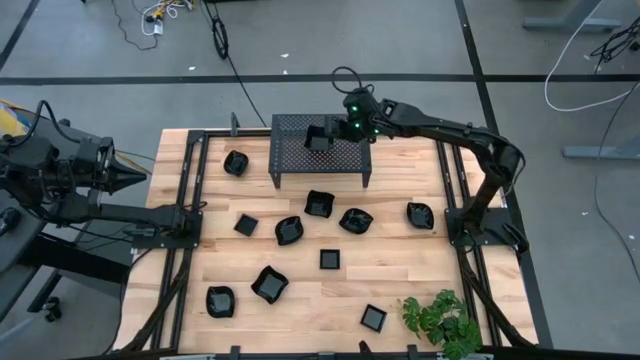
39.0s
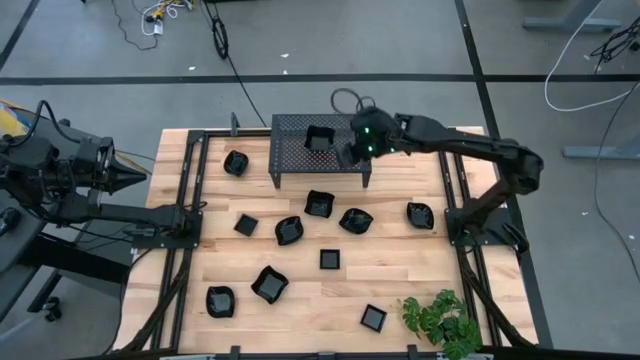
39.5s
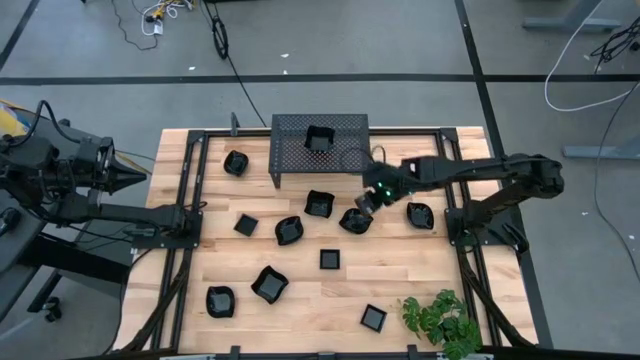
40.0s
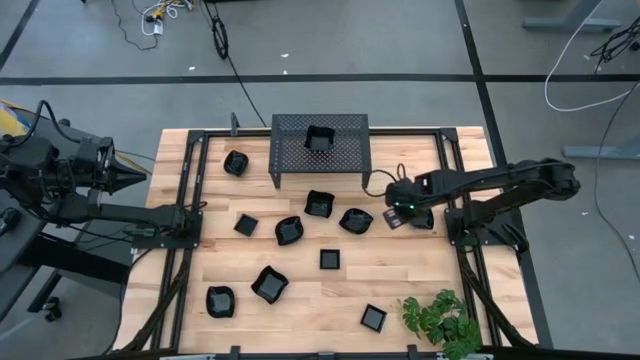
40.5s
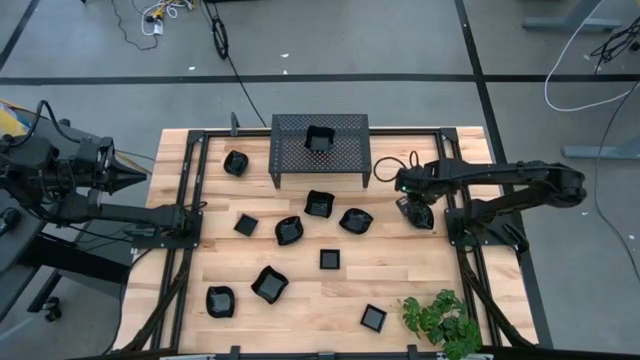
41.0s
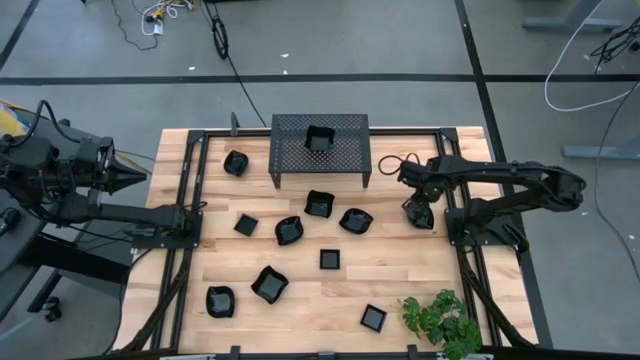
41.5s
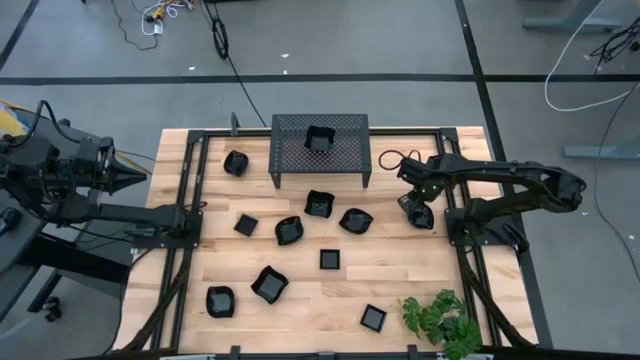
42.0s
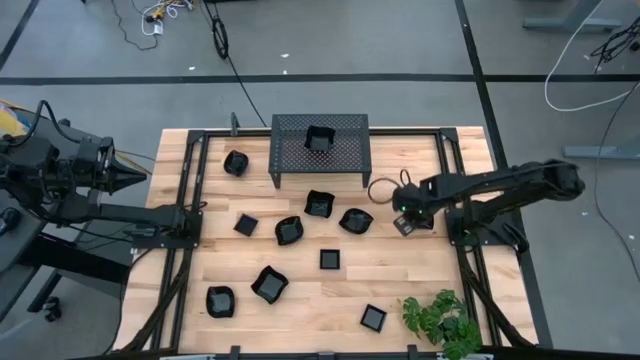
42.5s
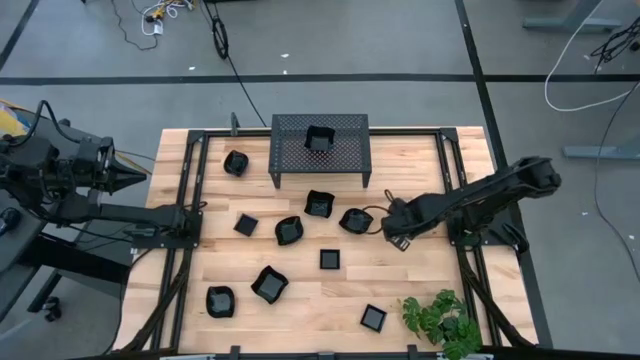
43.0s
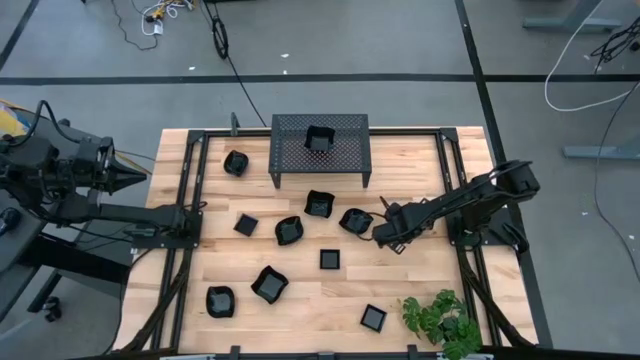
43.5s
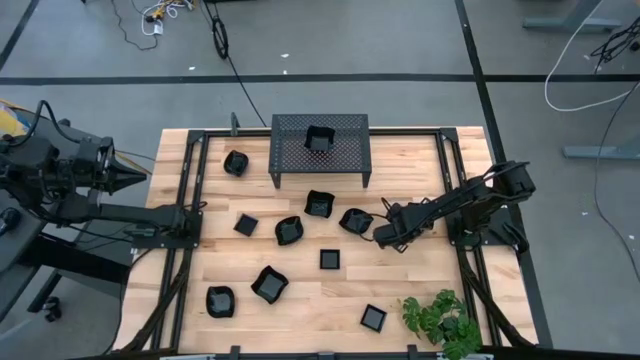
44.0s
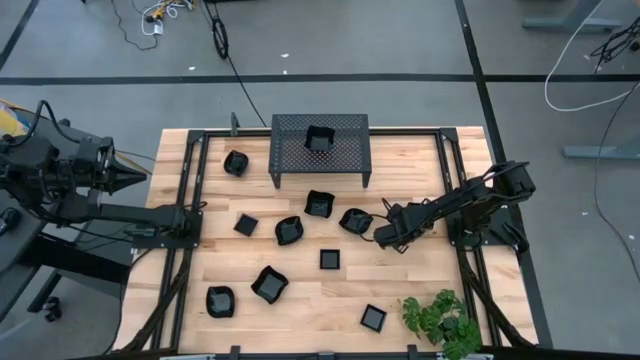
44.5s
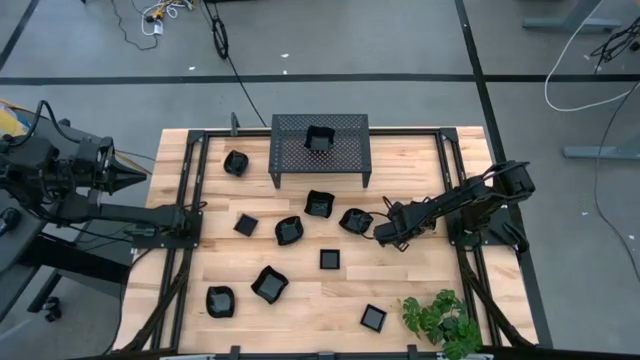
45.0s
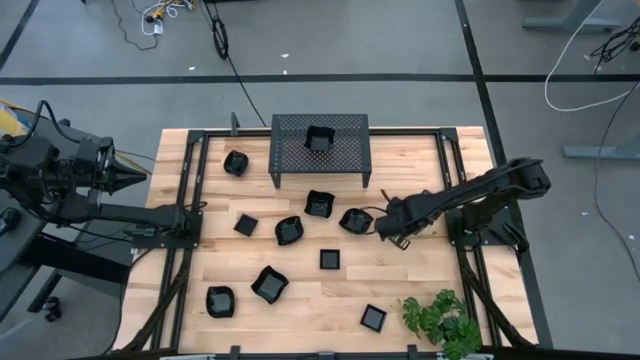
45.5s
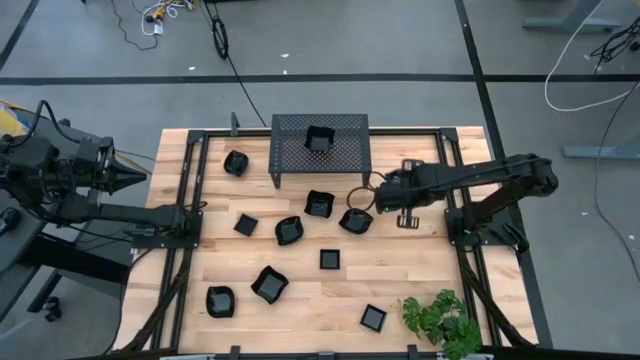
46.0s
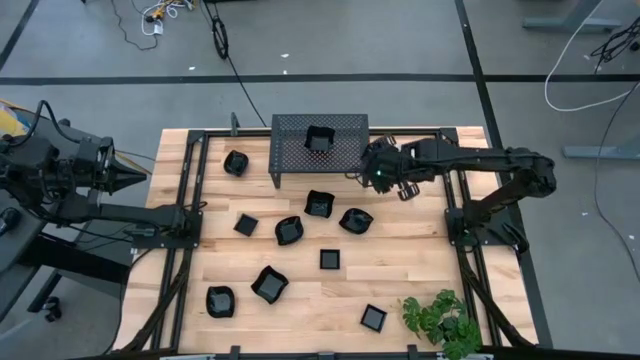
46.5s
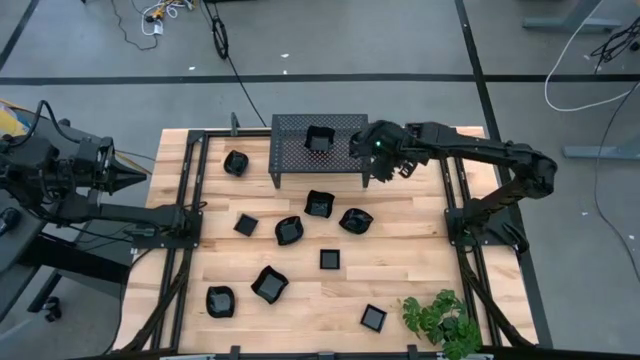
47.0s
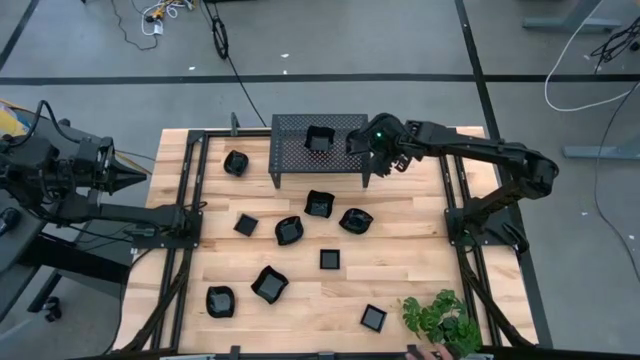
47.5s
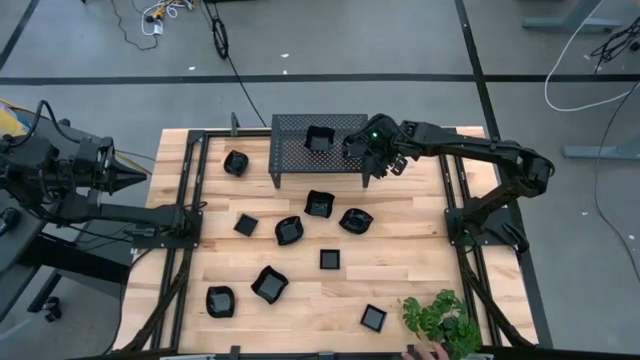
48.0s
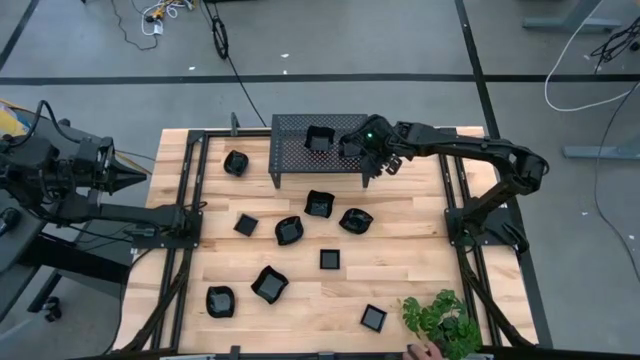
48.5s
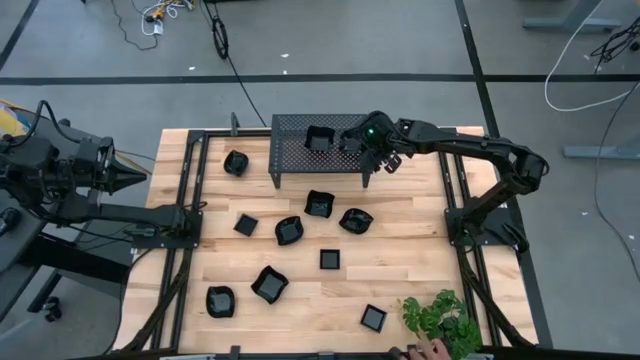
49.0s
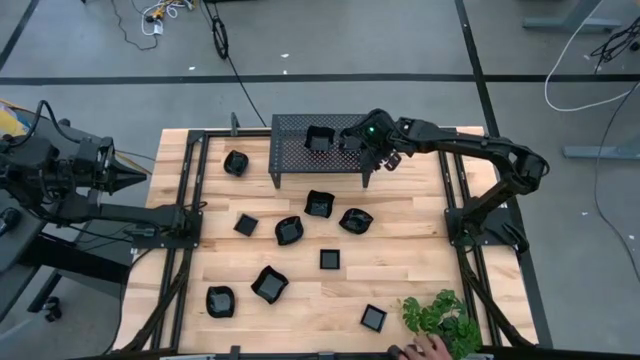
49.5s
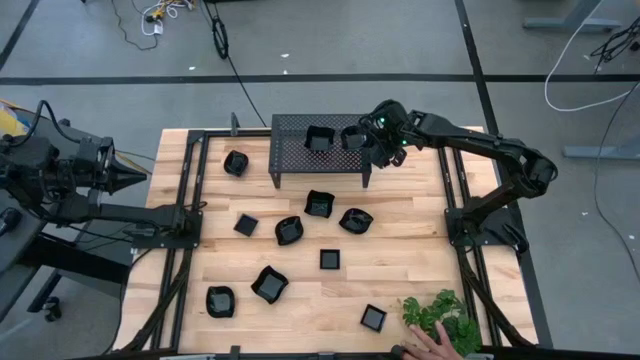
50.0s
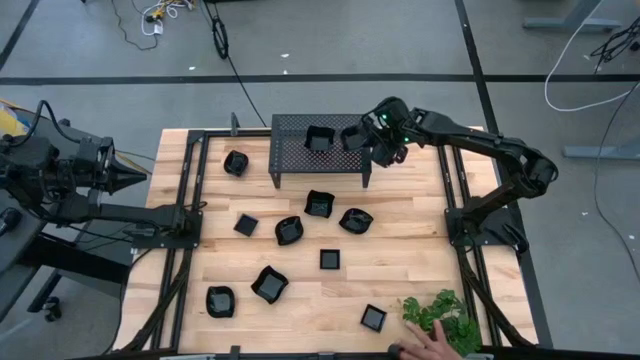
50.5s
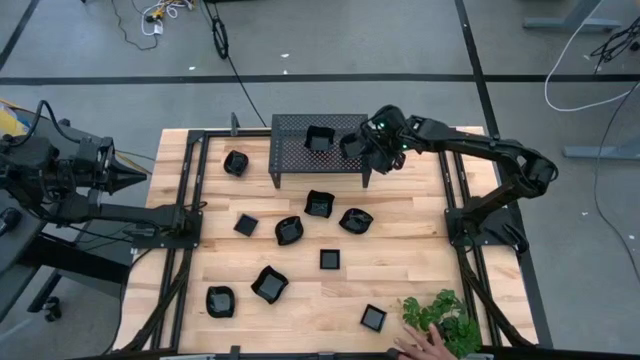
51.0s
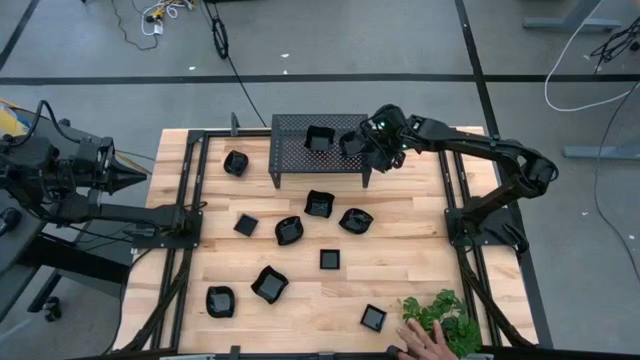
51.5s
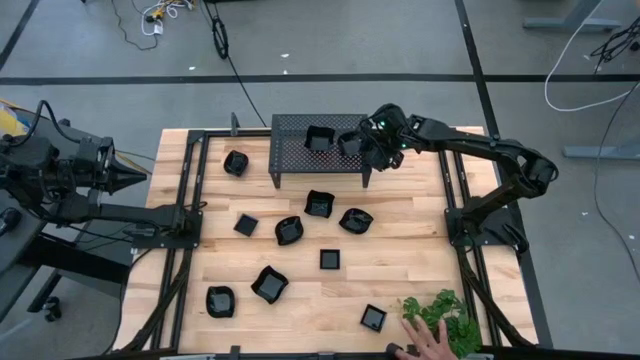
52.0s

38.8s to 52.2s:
Task: Pick & Place Mini shaped plates
Put the leaf shaped plate on the shelf

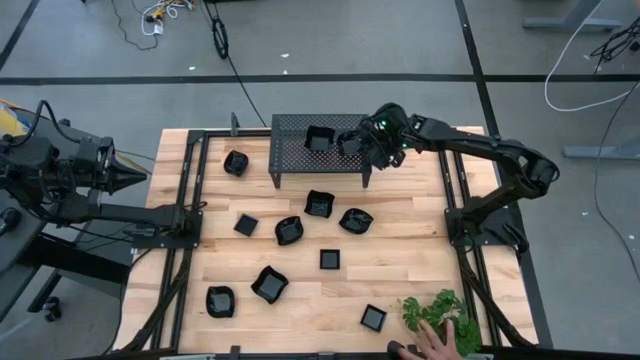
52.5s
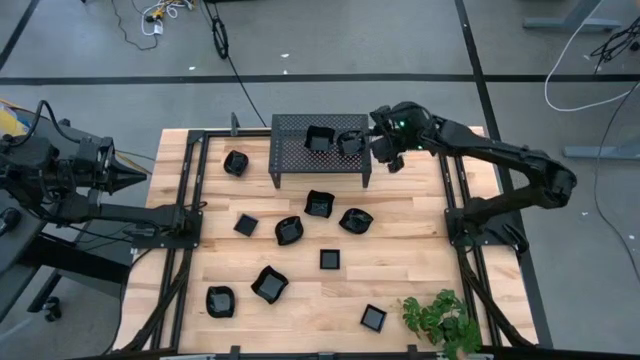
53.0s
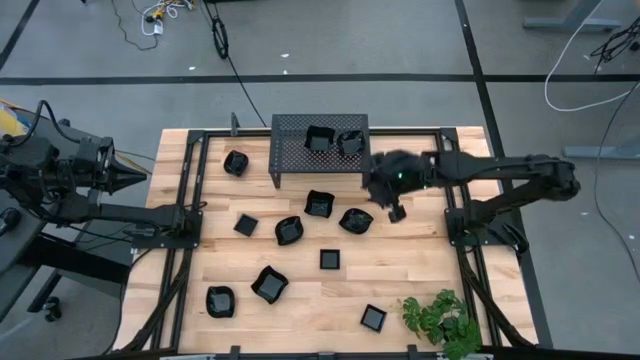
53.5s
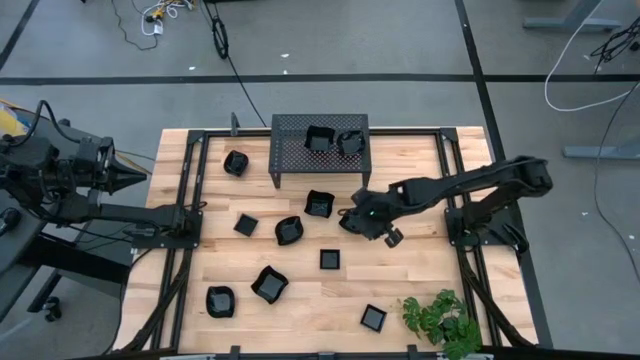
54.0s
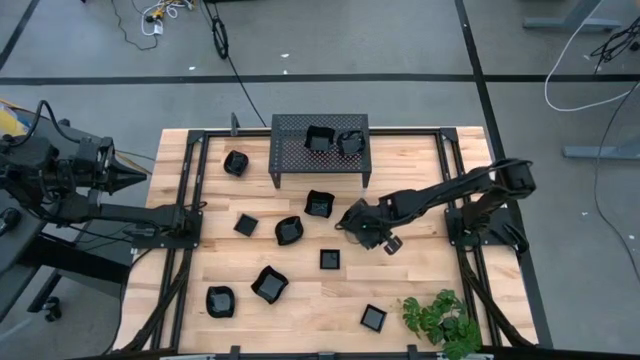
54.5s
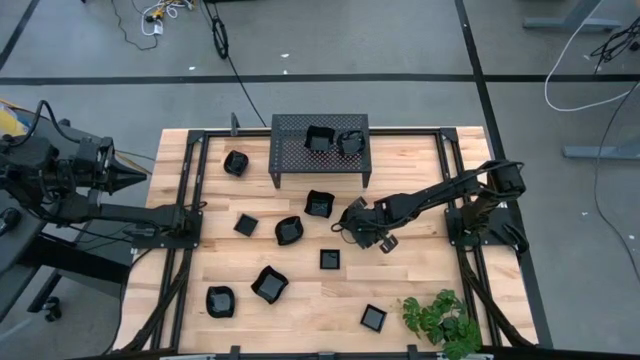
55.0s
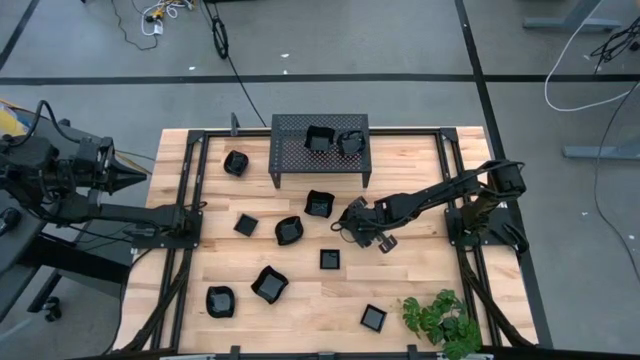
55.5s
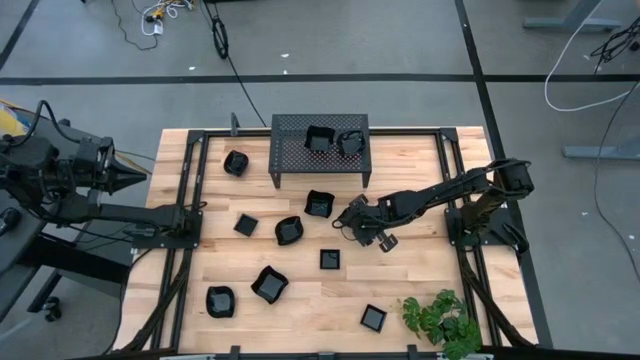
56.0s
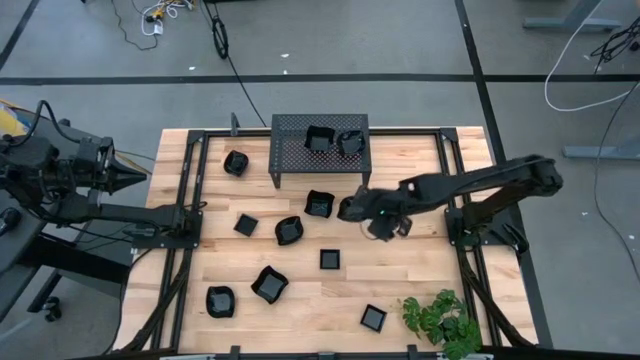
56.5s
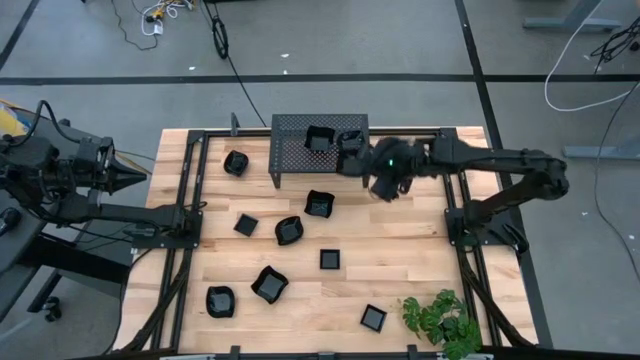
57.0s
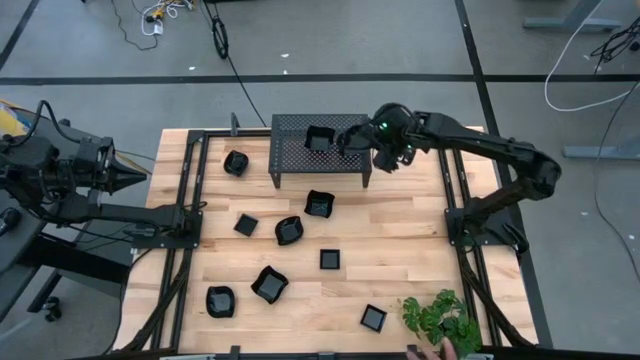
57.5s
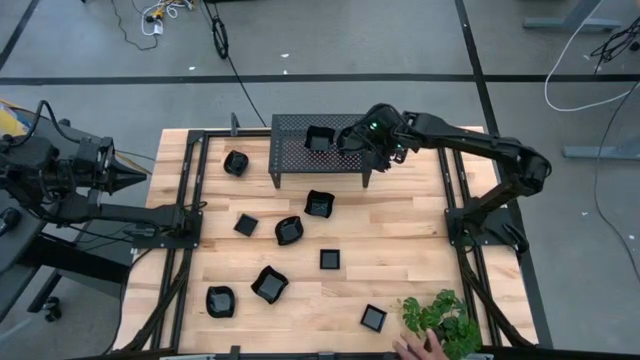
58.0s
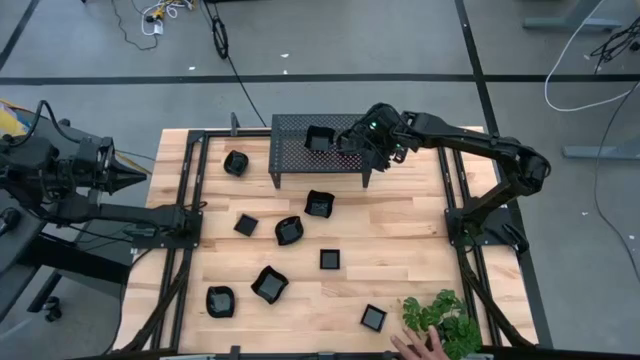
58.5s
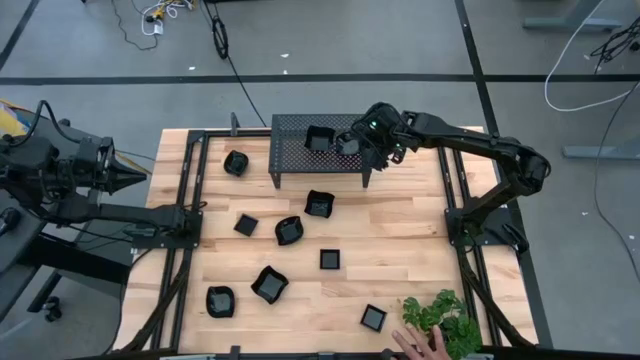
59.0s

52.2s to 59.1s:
Stack the leaf shaped plate on top of the other leaf shaped plate on the shelf

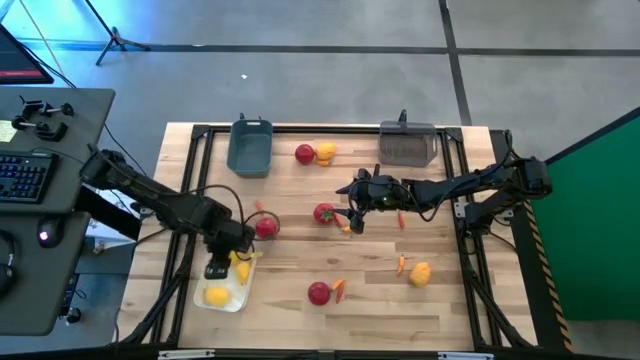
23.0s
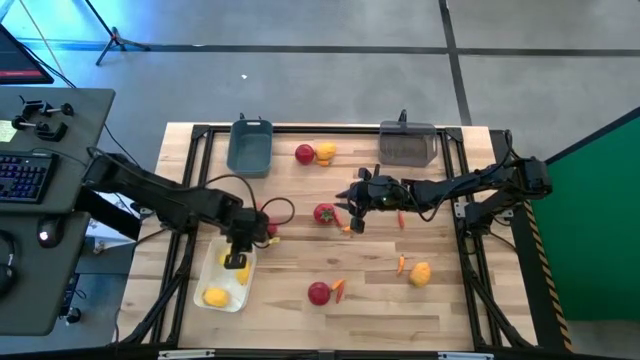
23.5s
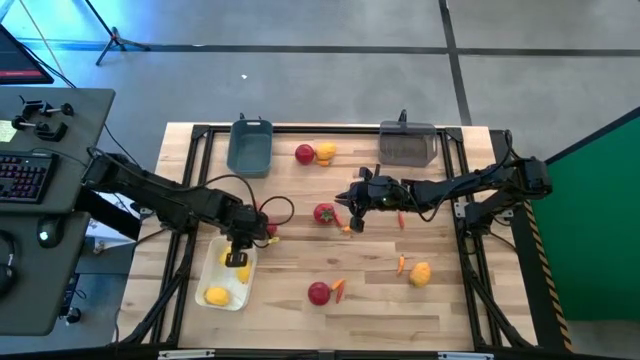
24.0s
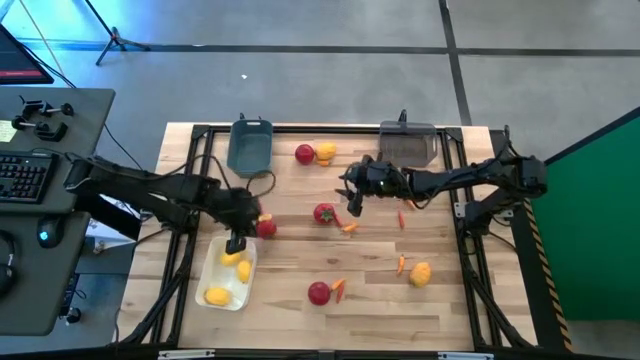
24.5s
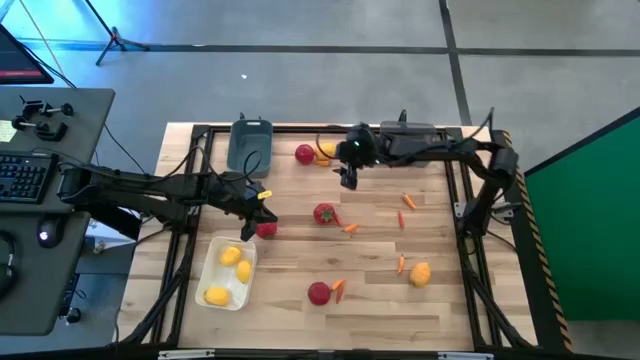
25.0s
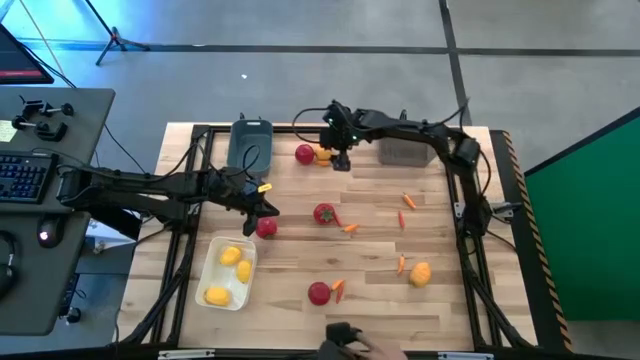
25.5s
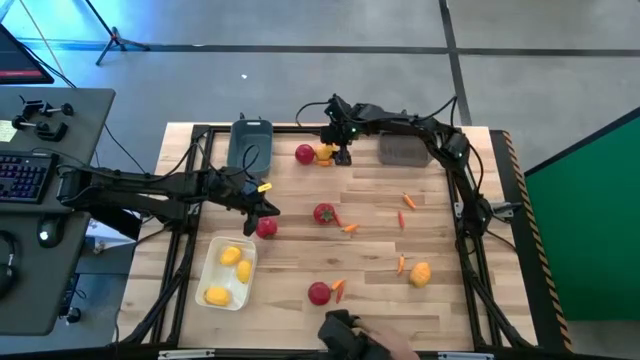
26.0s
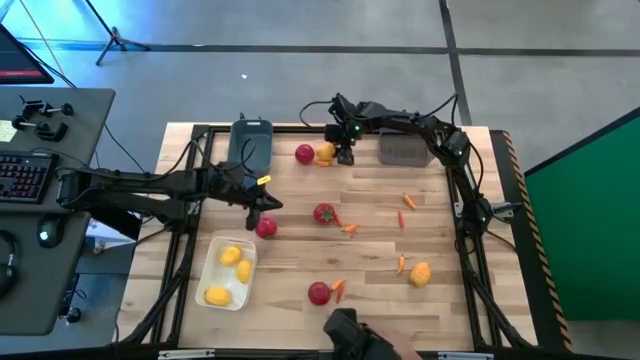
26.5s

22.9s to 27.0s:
Task: Sort produce into baskets
Put the yellow lemon into the white bin
